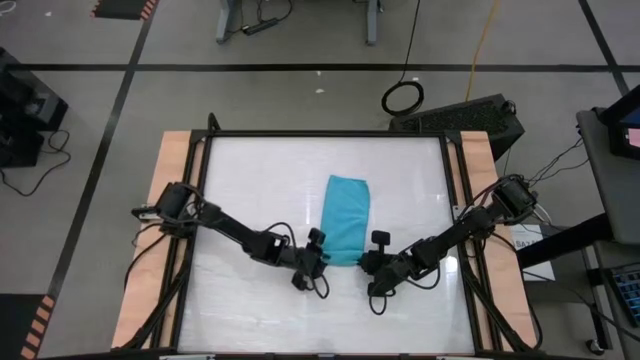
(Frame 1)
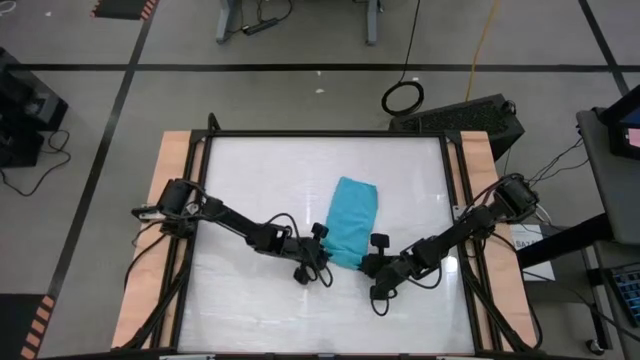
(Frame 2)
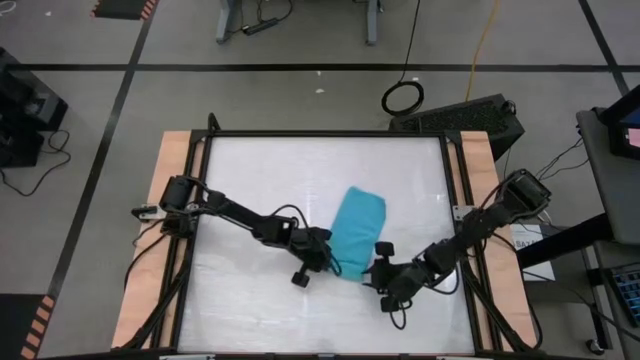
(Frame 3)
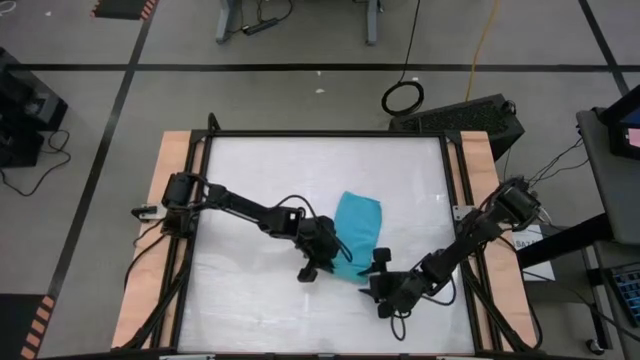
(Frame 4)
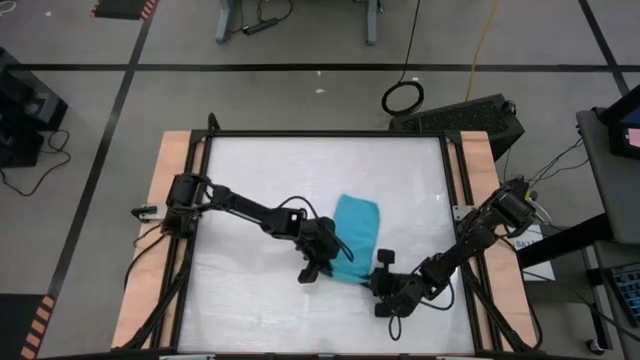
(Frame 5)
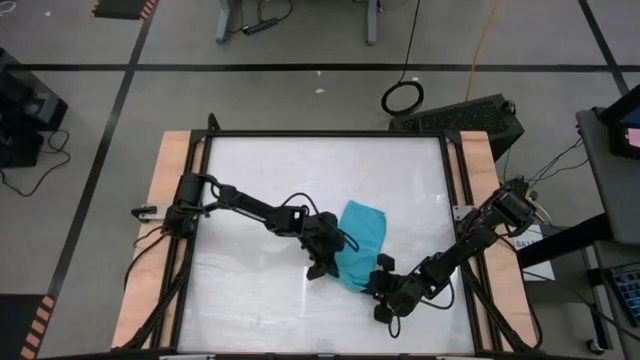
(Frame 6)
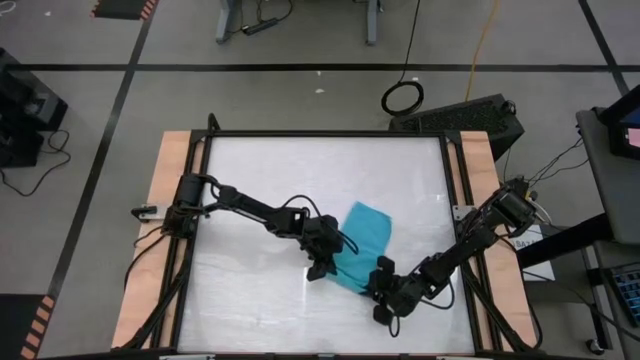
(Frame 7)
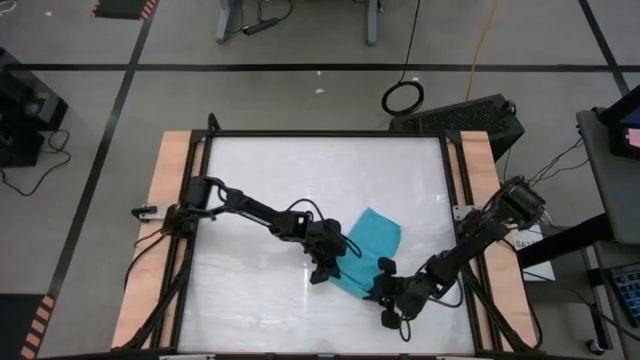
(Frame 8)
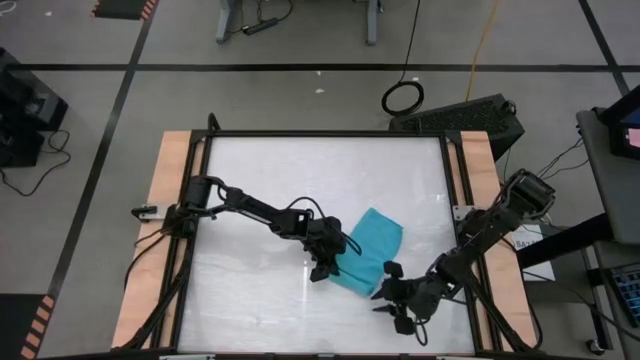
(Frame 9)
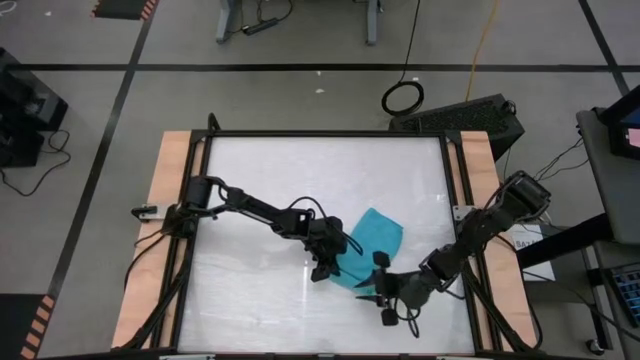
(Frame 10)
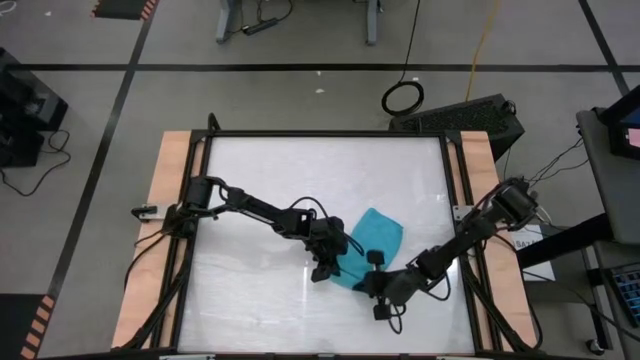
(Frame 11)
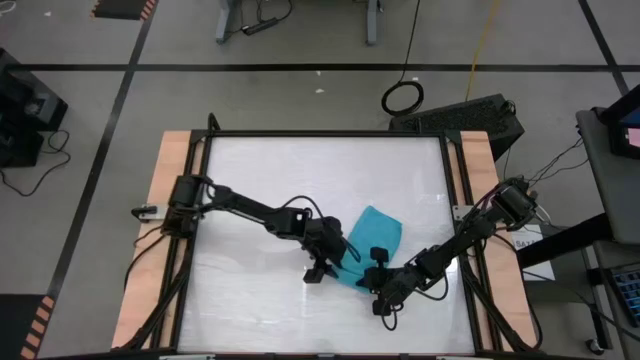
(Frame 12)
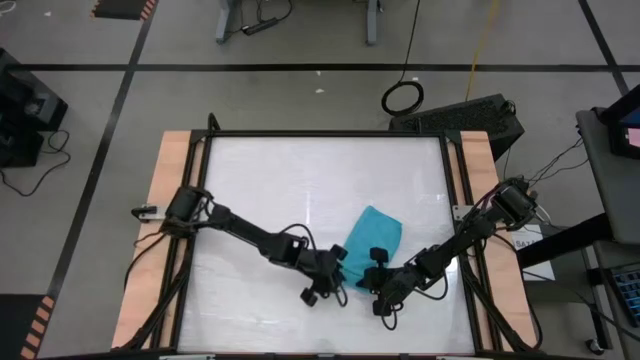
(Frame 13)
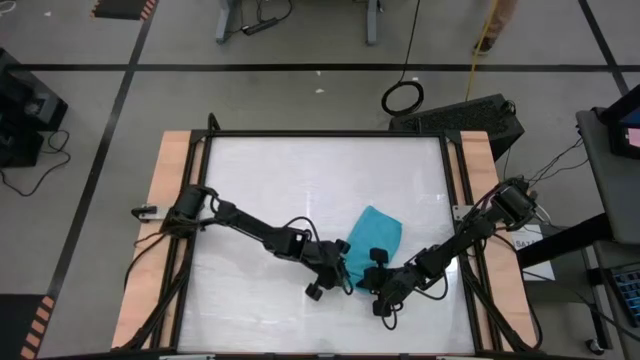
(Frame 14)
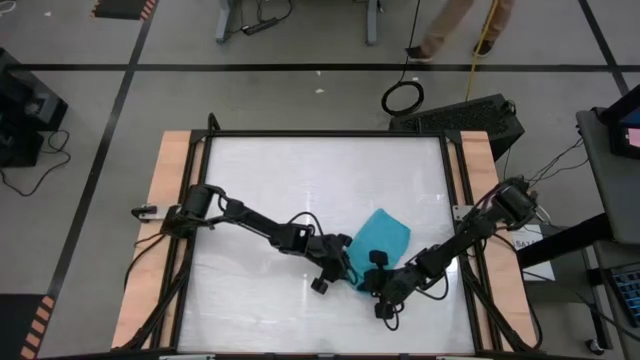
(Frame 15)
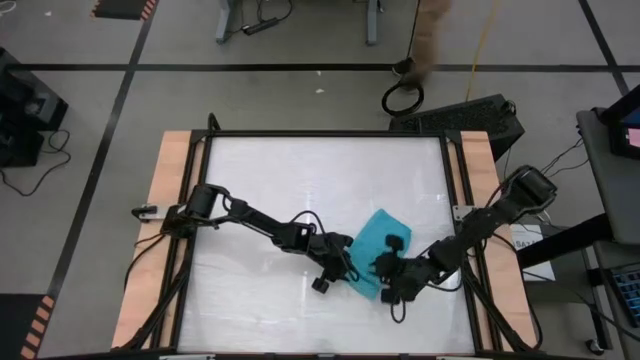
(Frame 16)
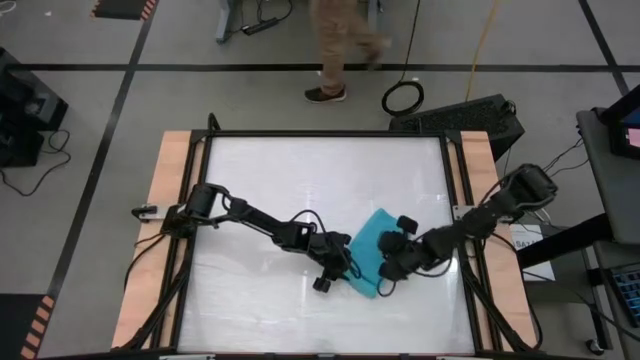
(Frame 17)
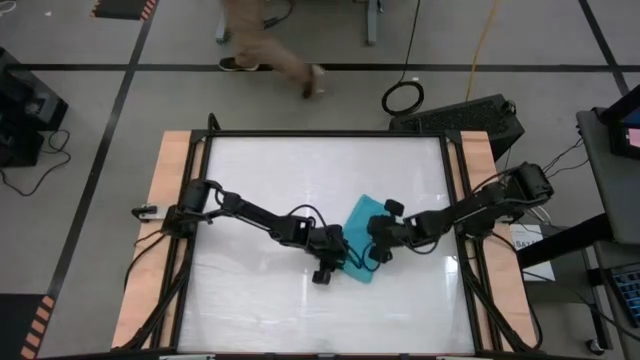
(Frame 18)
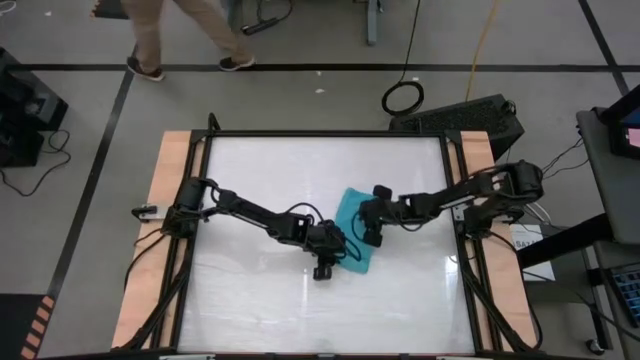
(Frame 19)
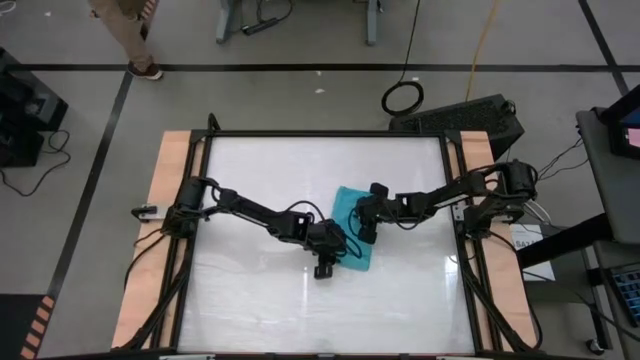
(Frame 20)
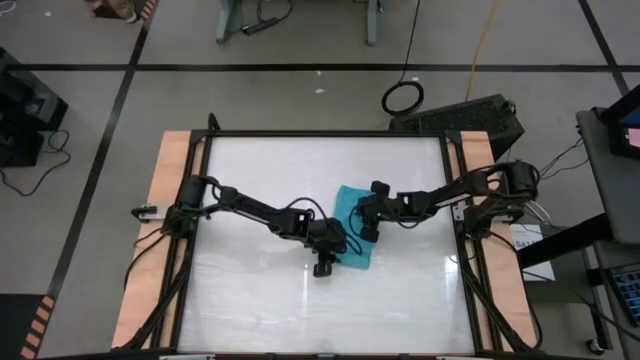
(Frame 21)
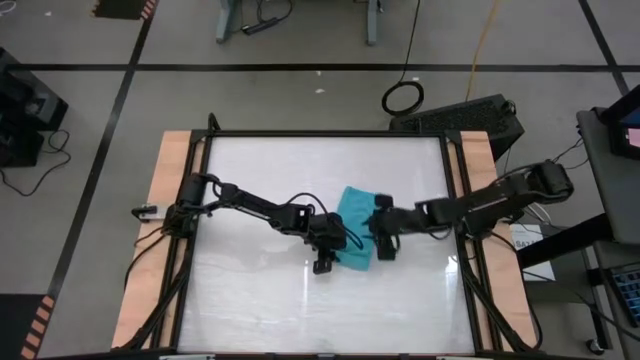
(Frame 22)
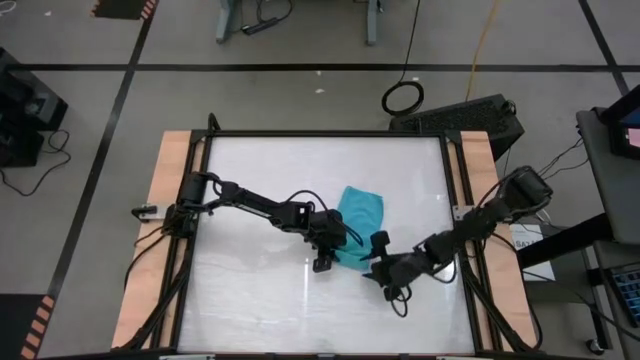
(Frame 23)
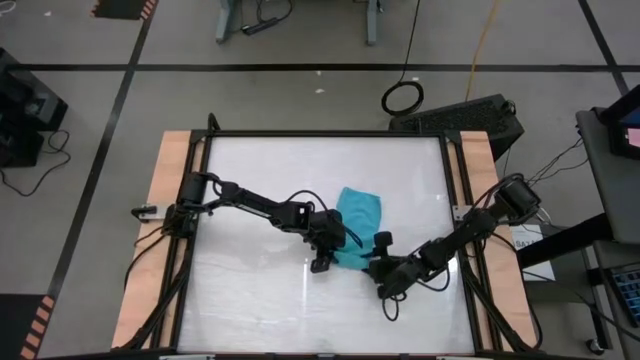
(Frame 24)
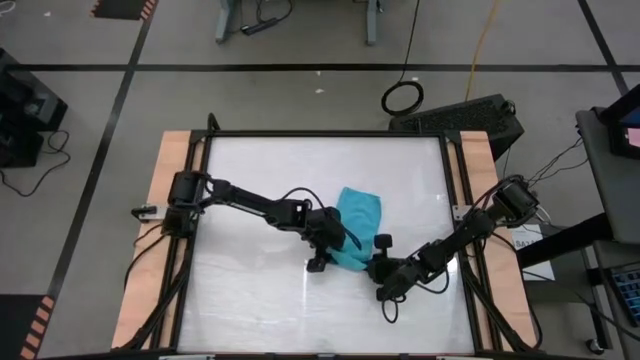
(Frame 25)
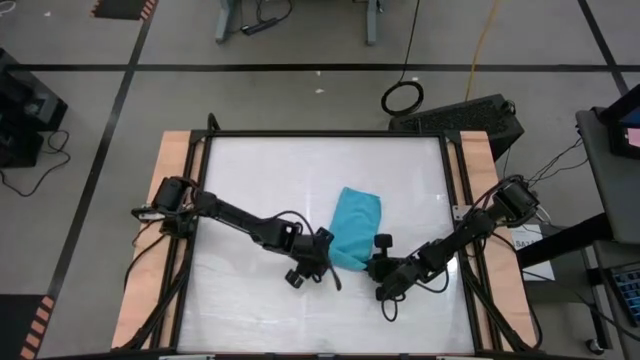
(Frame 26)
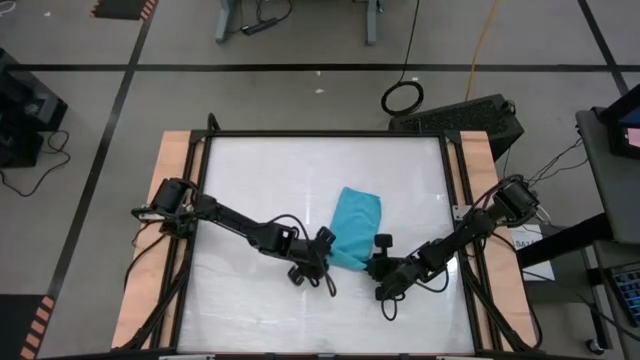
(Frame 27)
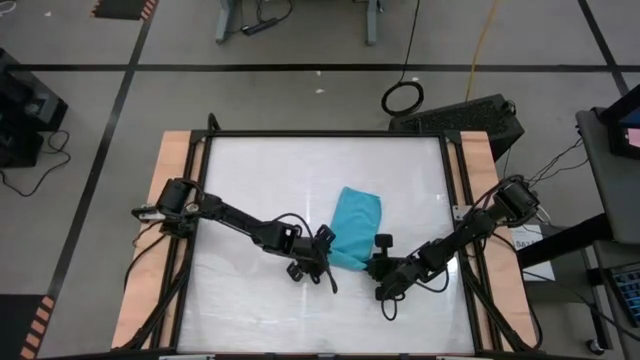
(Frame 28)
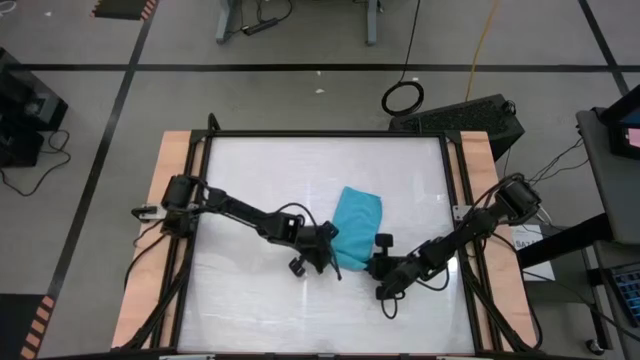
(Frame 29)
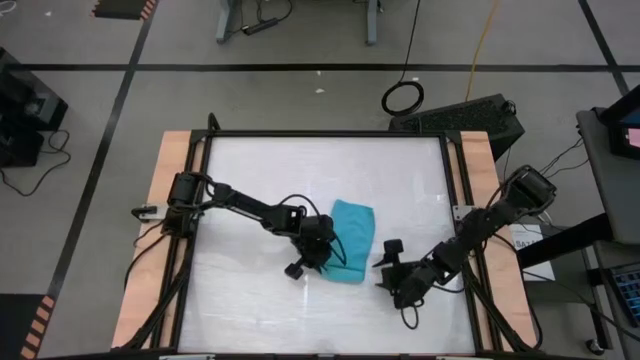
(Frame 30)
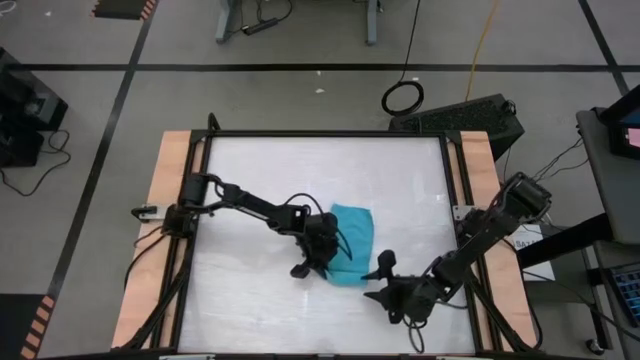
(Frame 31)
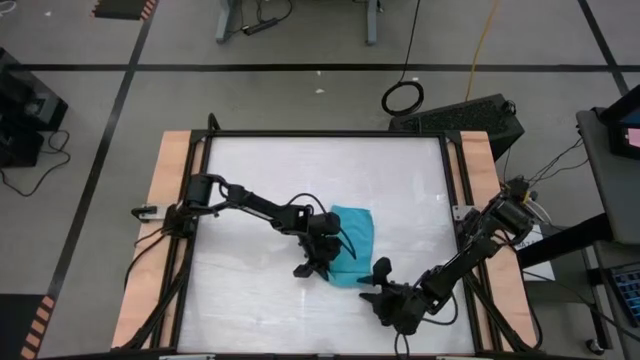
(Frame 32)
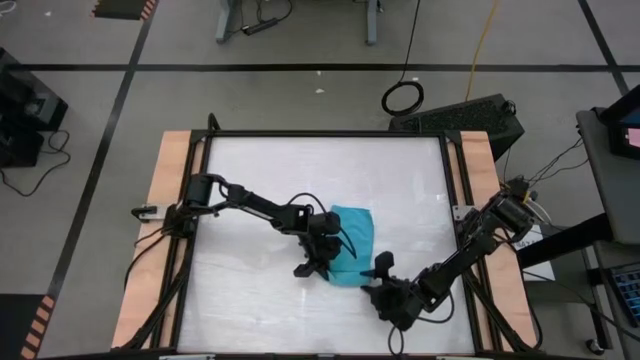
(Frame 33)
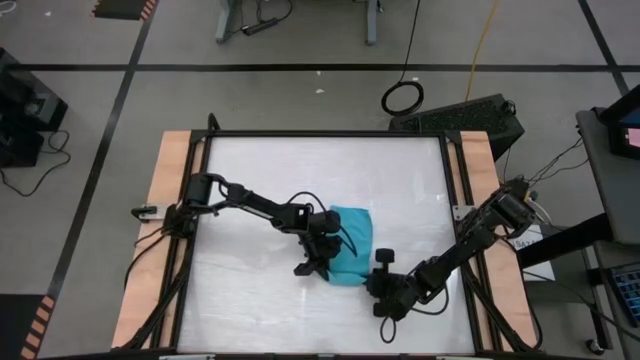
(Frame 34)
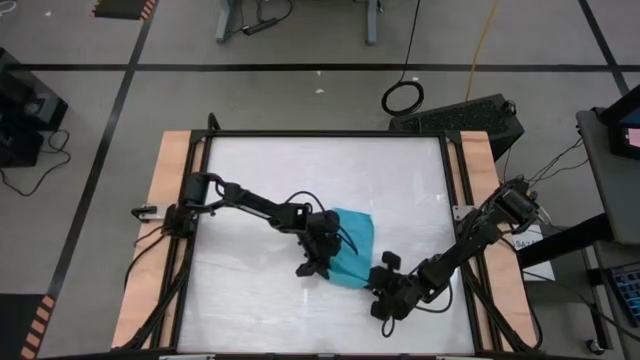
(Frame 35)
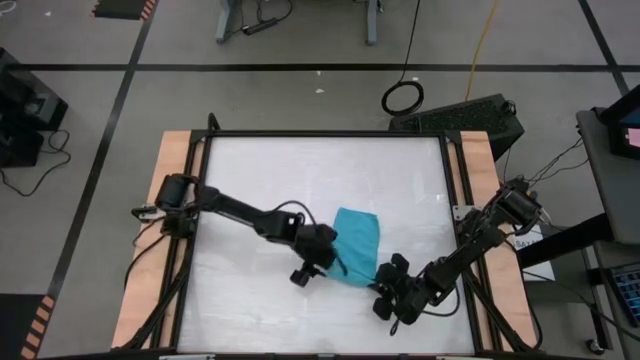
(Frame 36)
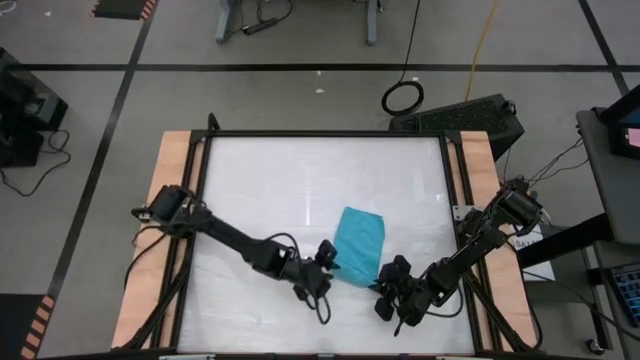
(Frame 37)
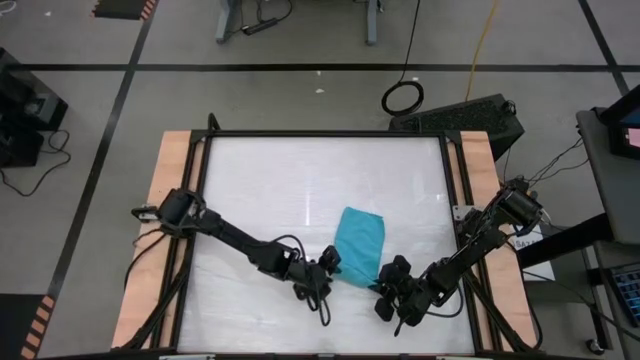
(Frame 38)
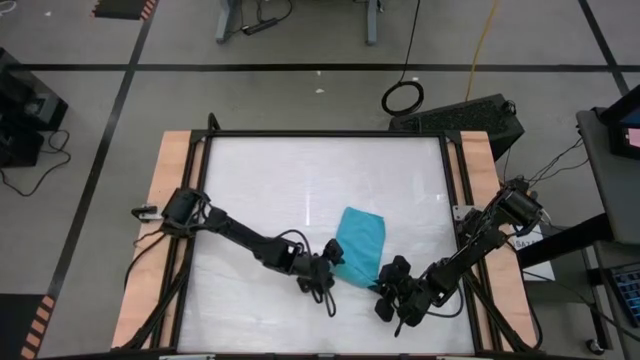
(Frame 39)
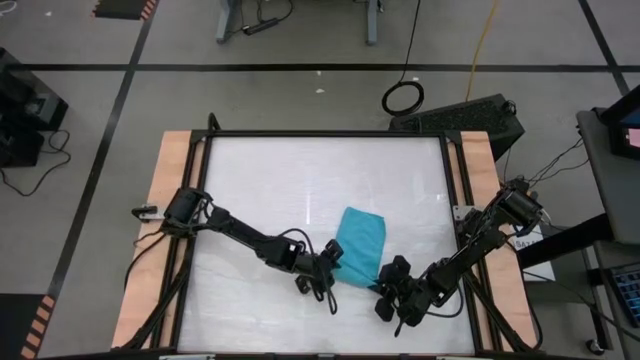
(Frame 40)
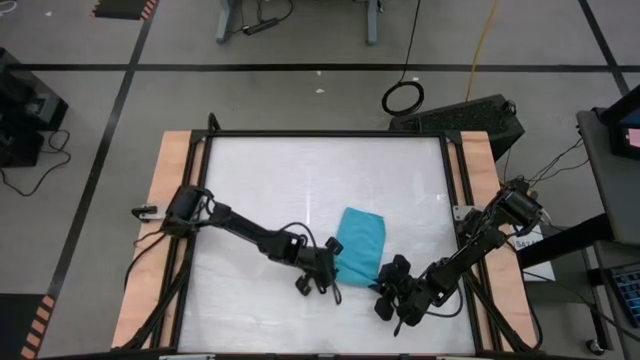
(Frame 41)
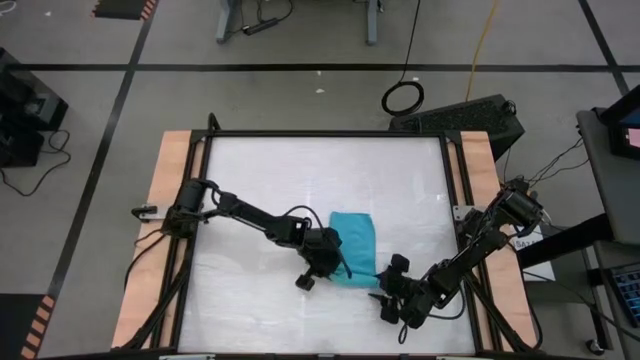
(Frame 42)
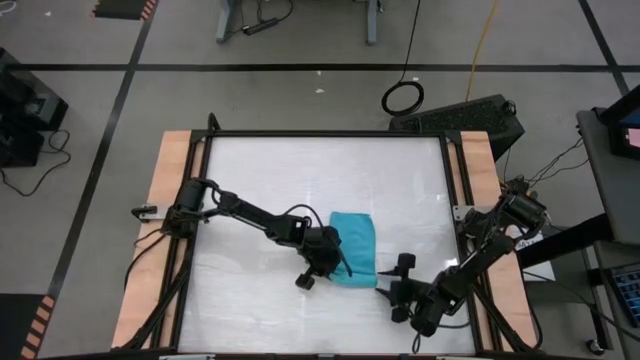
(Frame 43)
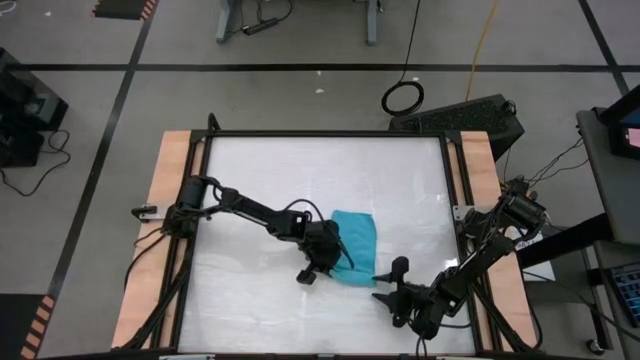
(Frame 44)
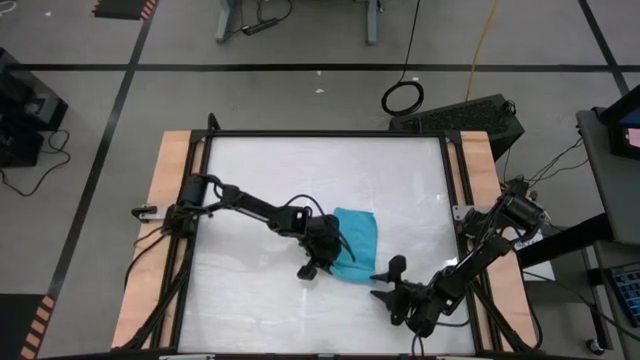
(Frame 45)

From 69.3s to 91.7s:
Task: Roll towel into tight, uniform cylinder
Roll the blue towel
